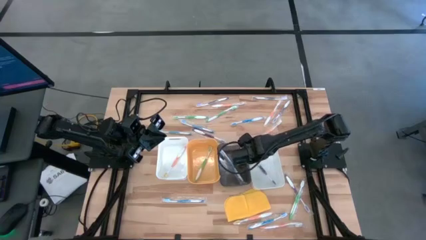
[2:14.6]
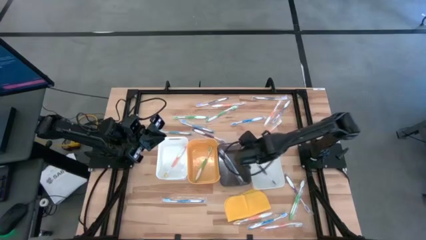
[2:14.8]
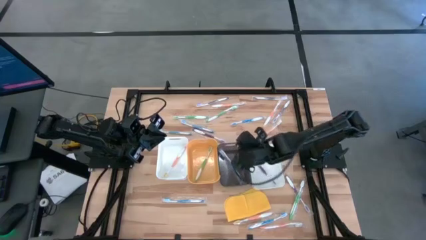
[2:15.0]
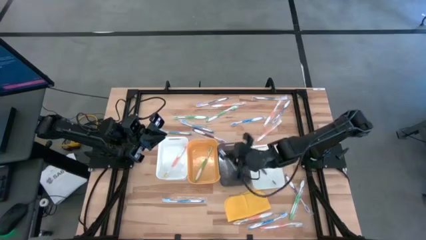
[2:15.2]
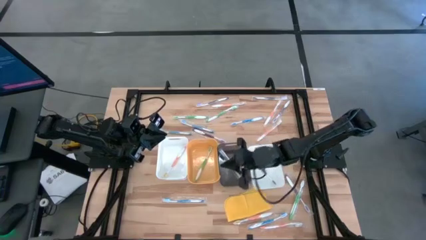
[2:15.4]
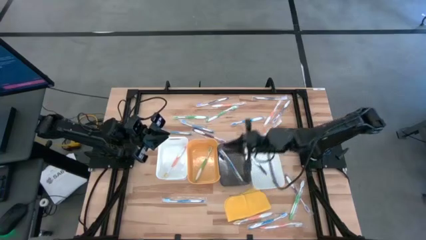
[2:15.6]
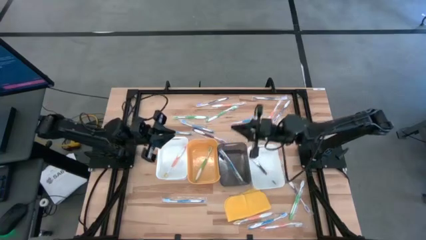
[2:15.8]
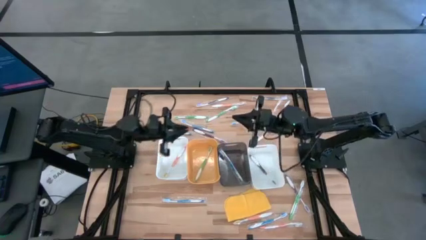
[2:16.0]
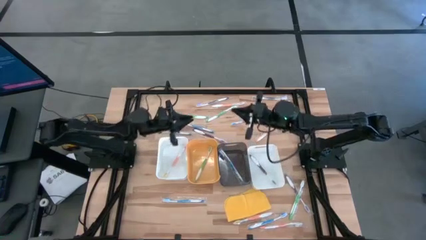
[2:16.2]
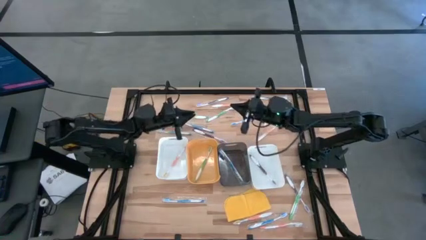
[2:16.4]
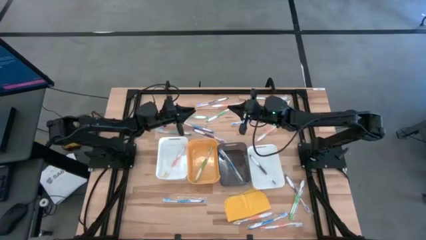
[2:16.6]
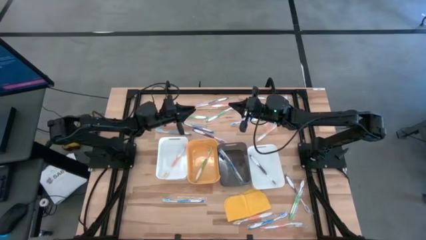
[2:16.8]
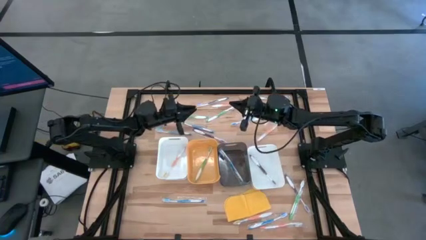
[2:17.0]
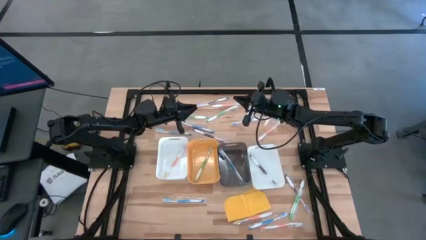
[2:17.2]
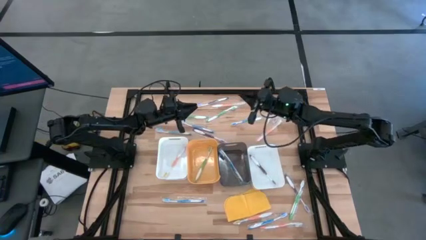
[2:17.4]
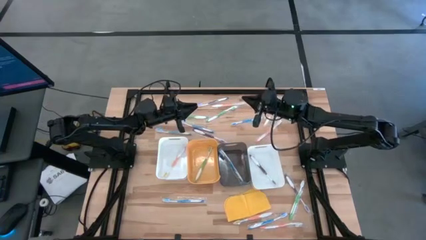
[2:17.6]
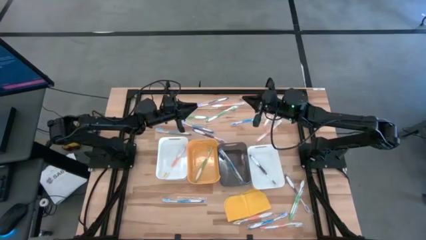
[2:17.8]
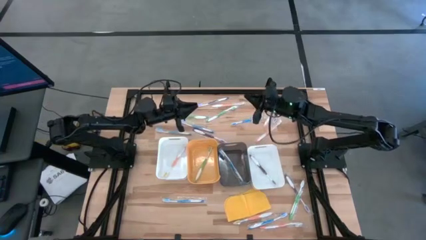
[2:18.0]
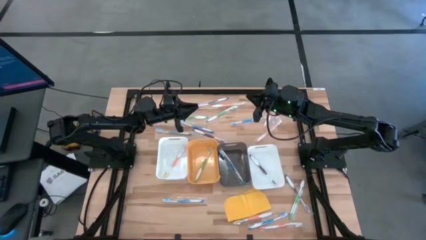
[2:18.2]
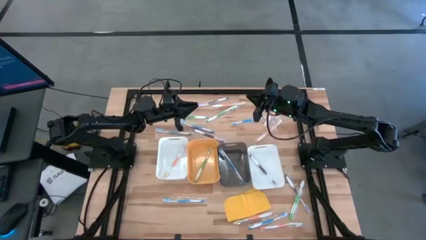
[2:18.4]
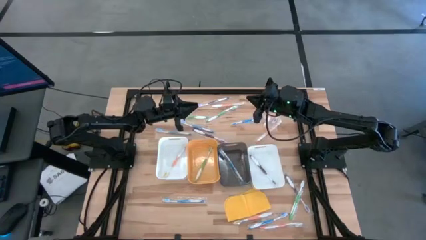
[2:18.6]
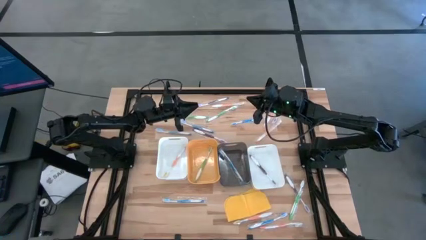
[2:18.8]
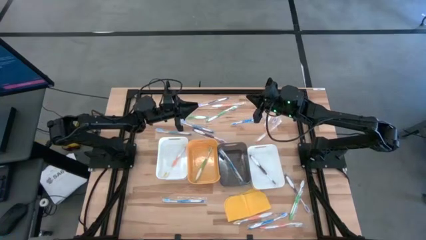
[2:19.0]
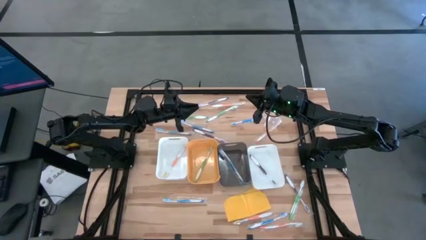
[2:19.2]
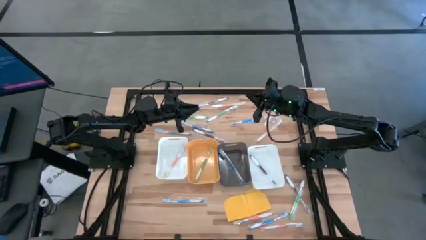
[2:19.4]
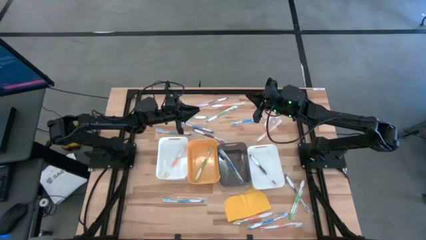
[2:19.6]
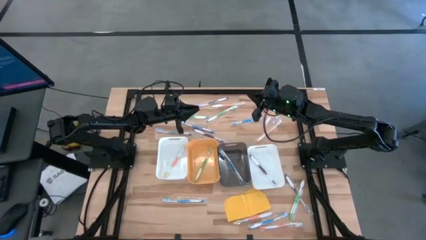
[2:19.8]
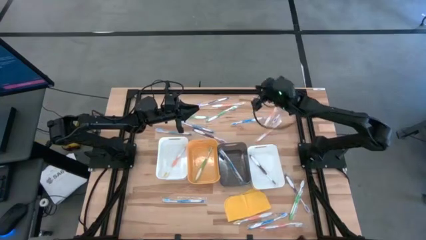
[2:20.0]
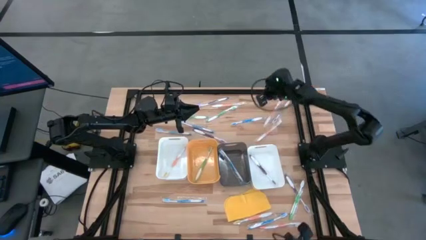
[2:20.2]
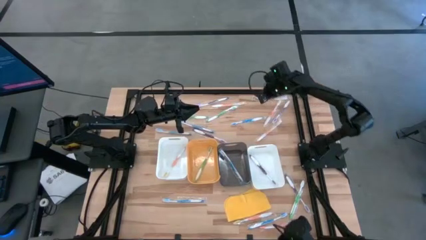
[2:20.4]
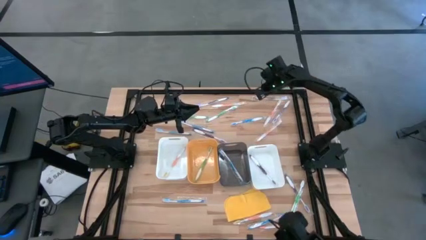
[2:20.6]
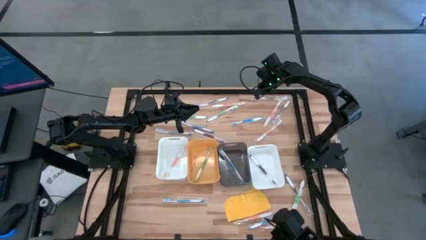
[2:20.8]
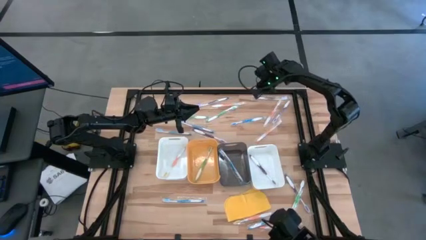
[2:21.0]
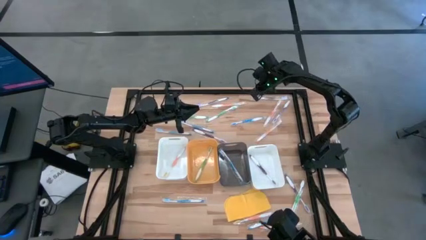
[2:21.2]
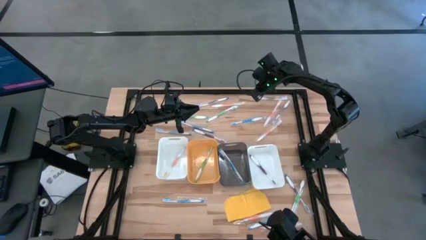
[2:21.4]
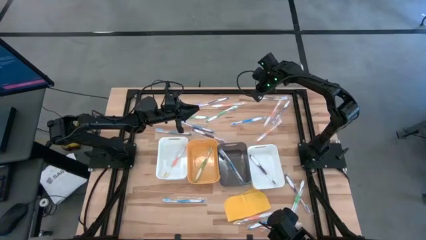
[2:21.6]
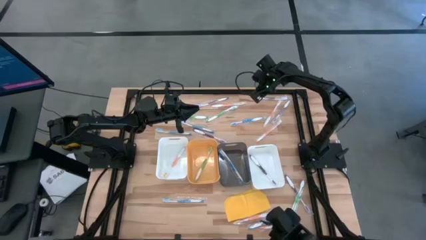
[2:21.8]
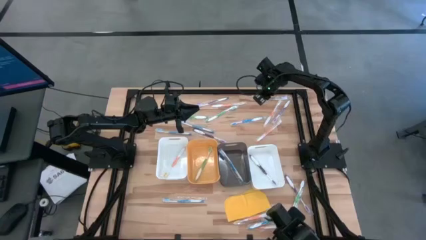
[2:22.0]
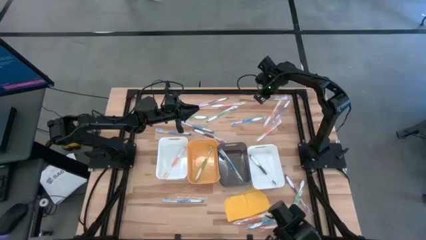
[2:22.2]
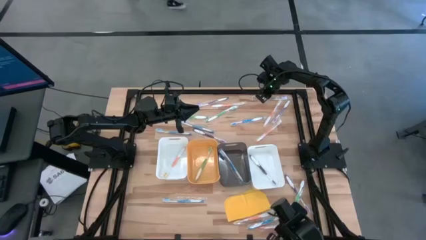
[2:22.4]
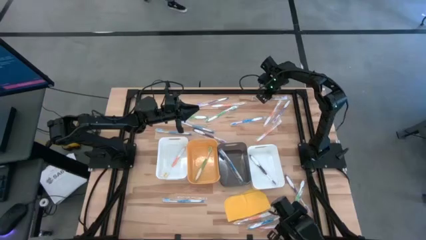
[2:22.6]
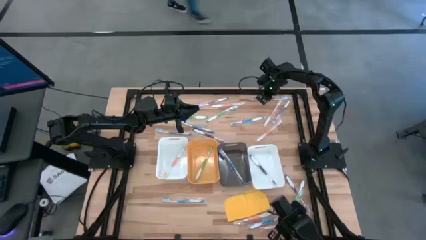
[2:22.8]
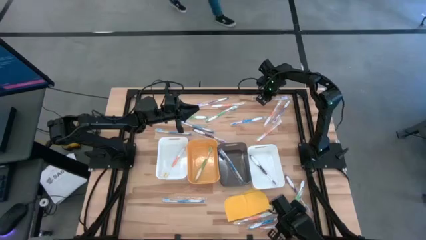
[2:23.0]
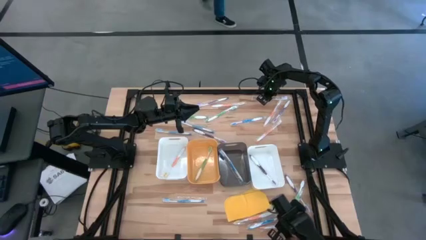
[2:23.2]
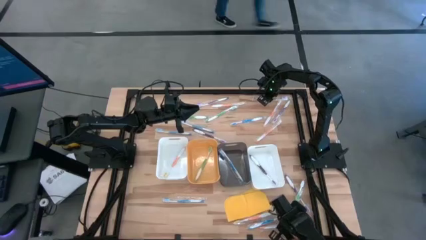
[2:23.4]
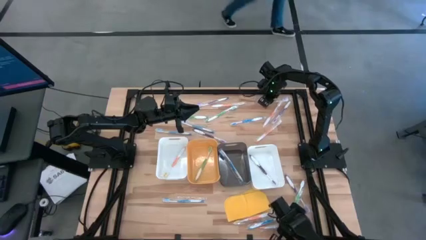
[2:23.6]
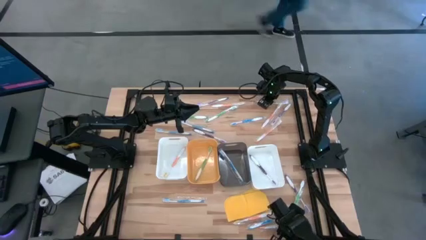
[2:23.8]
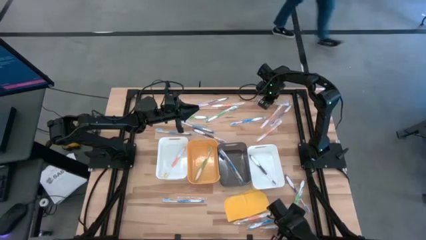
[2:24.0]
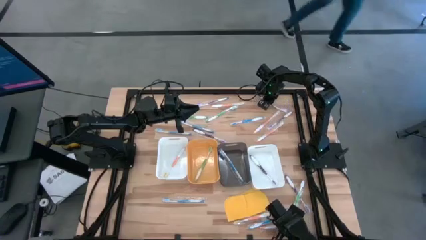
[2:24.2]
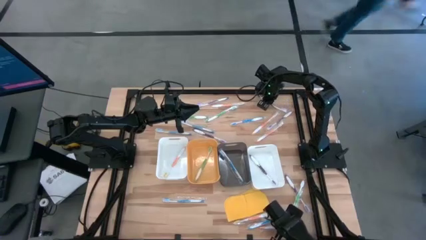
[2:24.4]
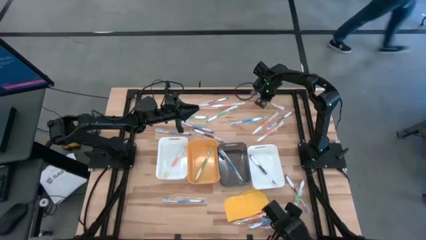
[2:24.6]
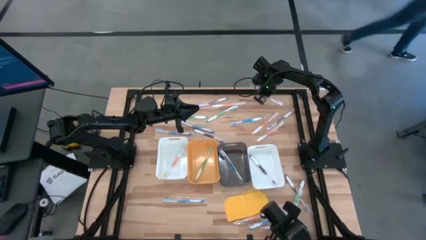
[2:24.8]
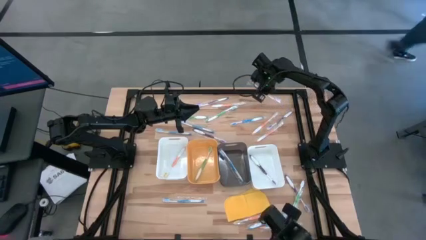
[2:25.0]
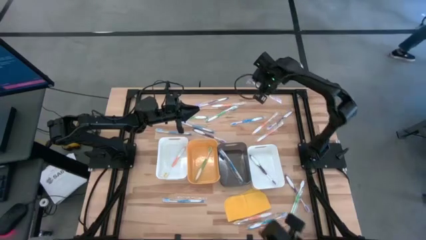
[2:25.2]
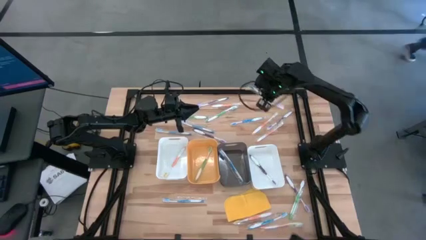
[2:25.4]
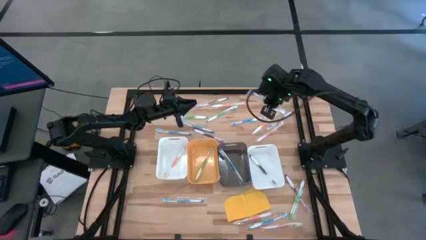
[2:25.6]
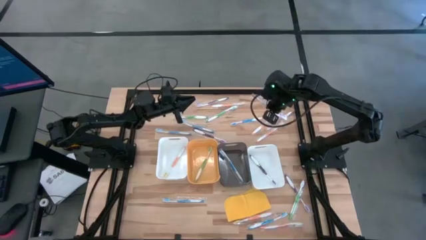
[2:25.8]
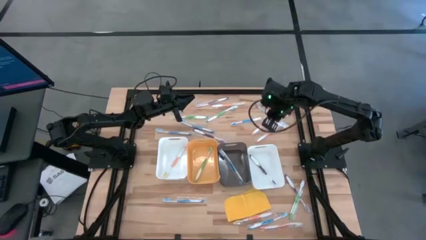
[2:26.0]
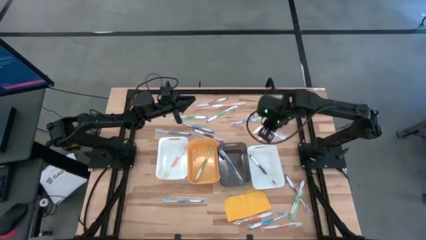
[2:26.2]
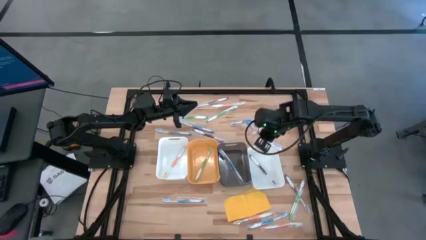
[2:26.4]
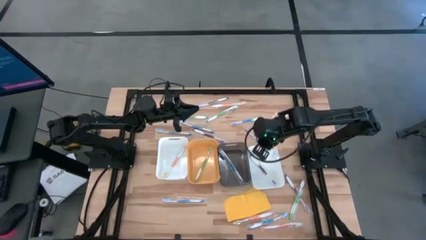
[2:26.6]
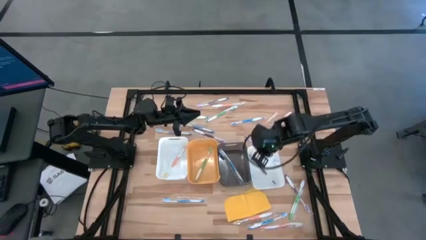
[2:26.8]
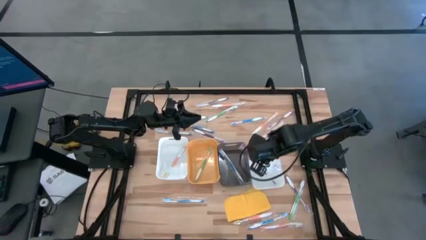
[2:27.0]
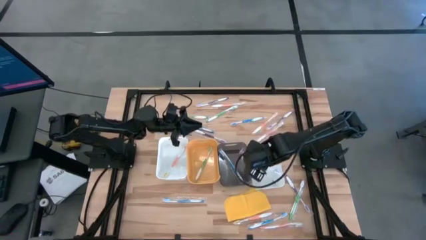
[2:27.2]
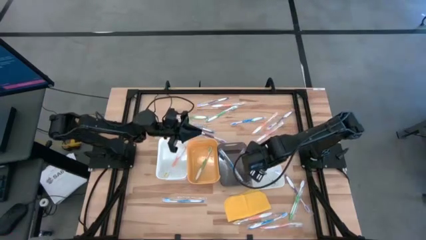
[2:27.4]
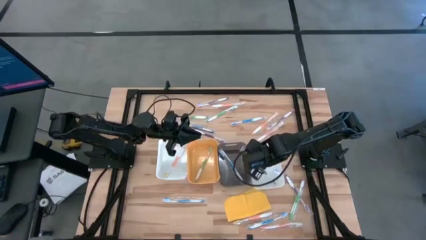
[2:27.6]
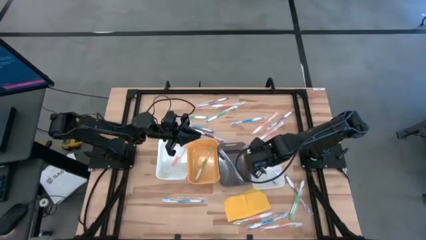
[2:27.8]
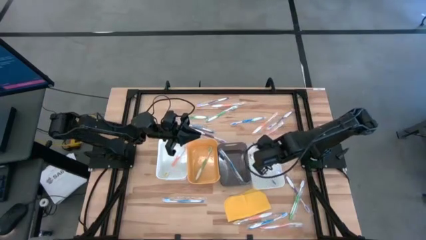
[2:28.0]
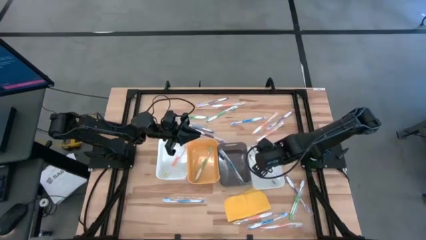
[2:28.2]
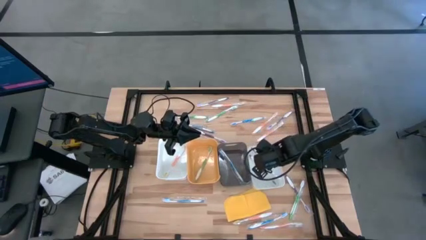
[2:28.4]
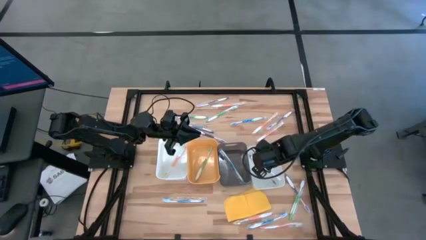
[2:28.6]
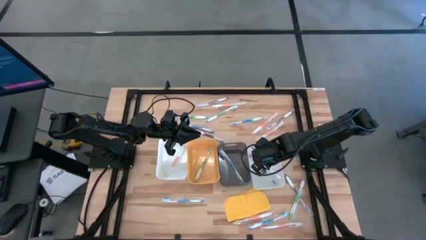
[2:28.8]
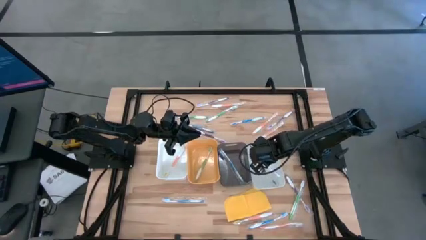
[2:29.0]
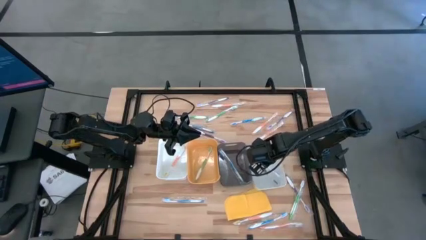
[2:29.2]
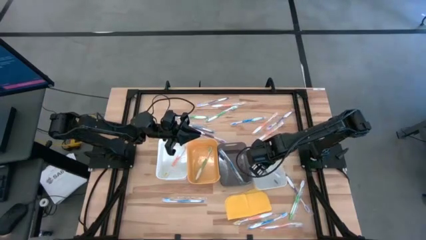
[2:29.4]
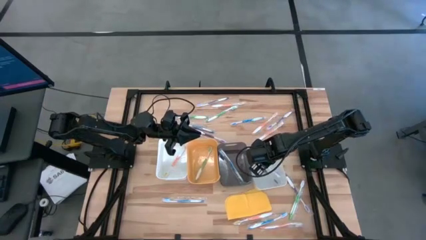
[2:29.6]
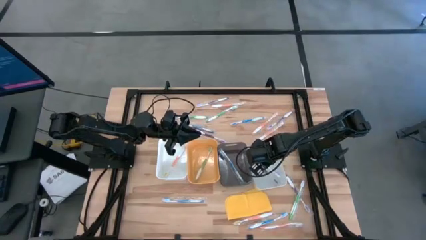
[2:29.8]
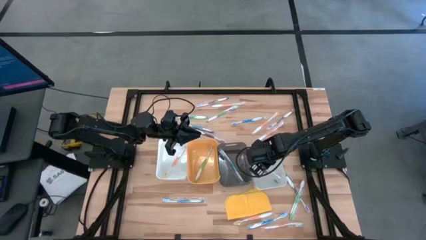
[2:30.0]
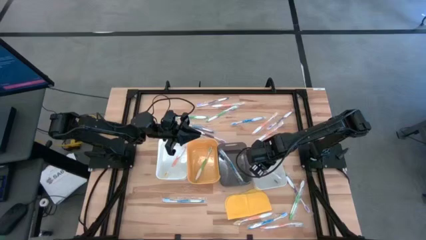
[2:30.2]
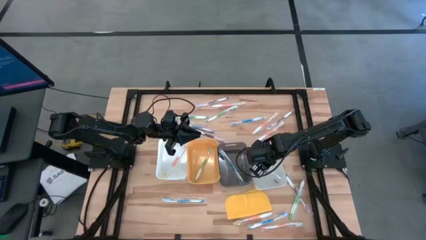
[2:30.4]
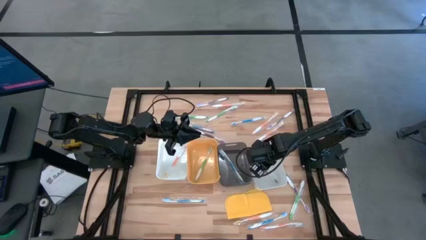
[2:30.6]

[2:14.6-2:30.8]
Task: Pick & Place Toothbrushes
Put the purple toothbrush into the right white bin
